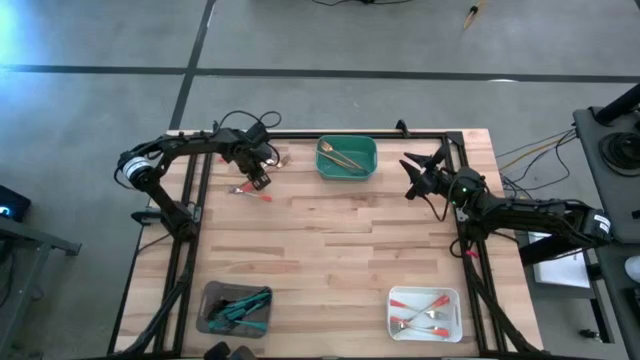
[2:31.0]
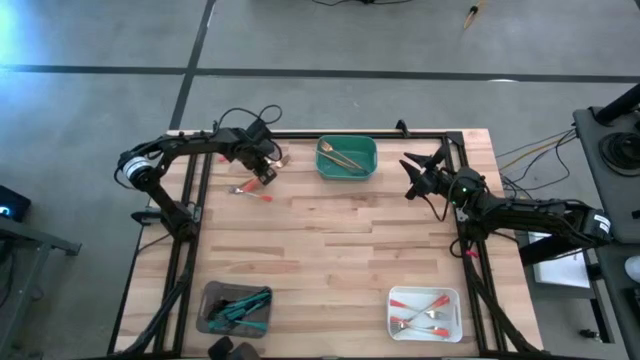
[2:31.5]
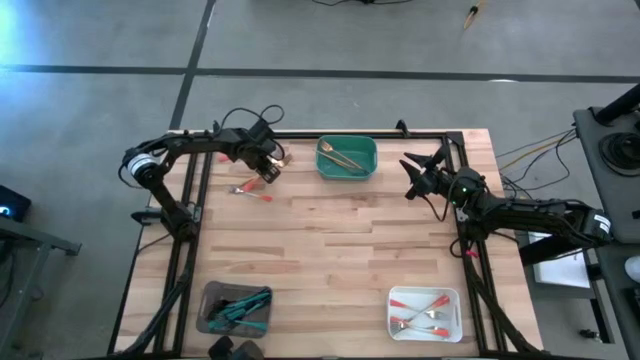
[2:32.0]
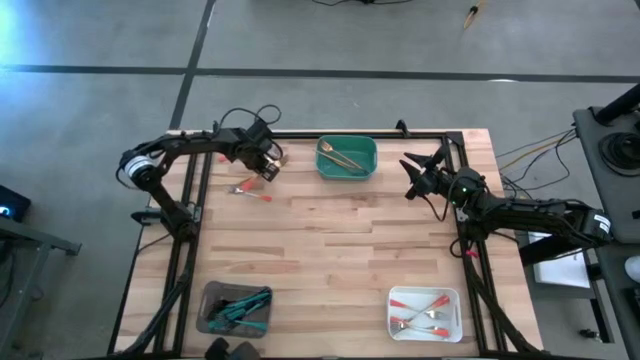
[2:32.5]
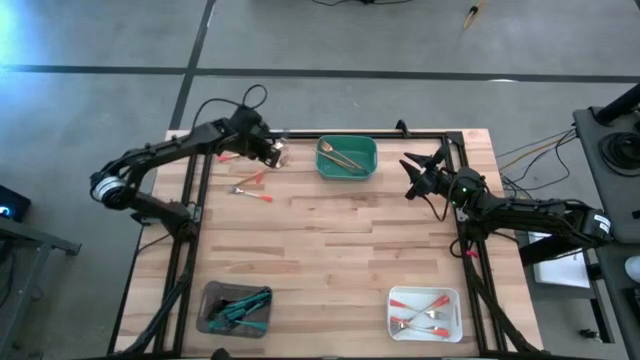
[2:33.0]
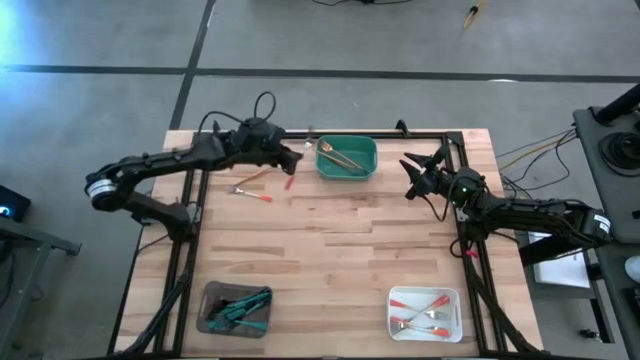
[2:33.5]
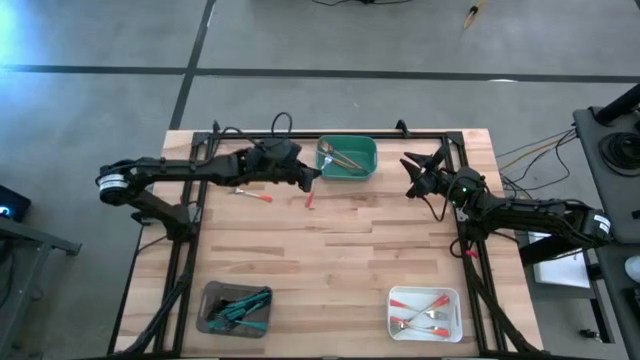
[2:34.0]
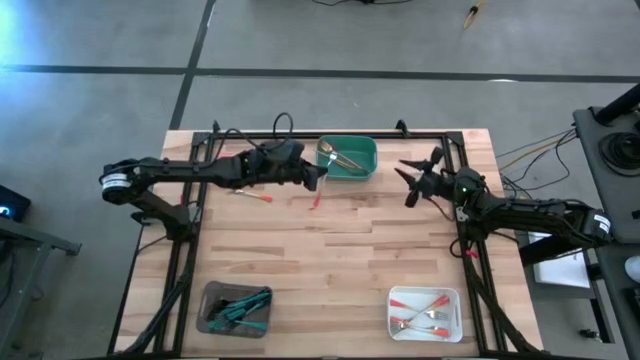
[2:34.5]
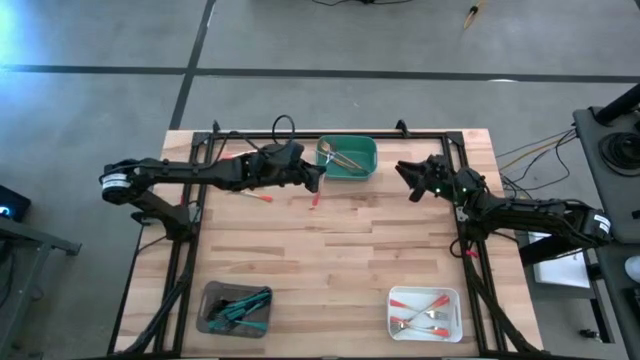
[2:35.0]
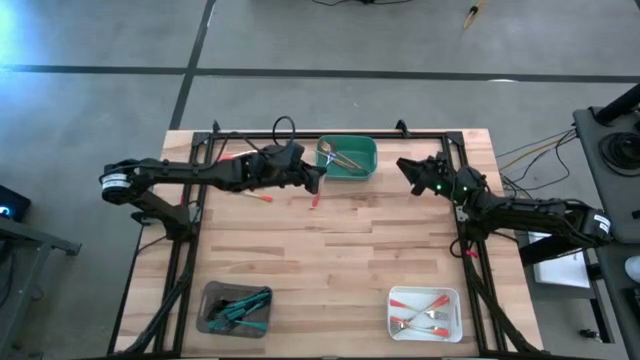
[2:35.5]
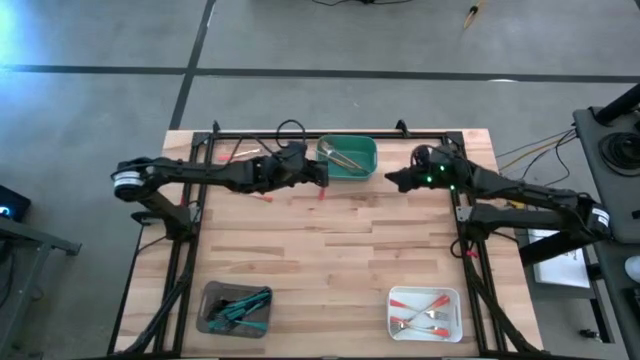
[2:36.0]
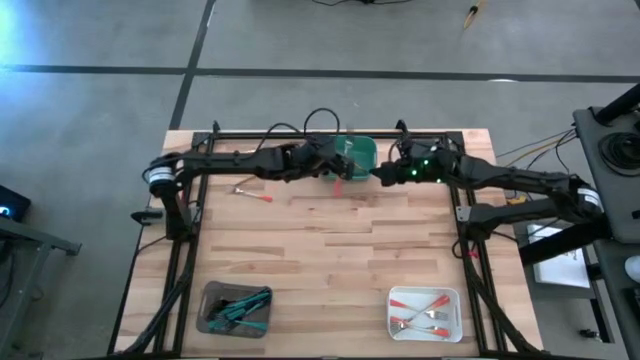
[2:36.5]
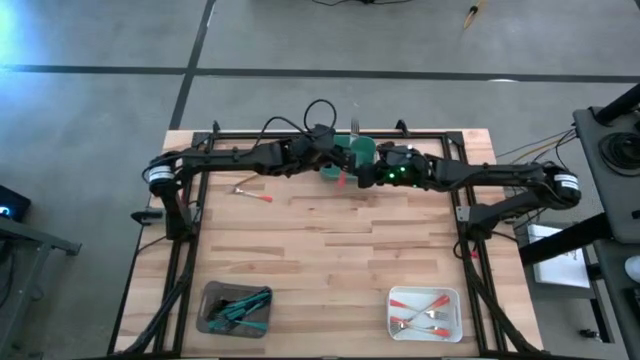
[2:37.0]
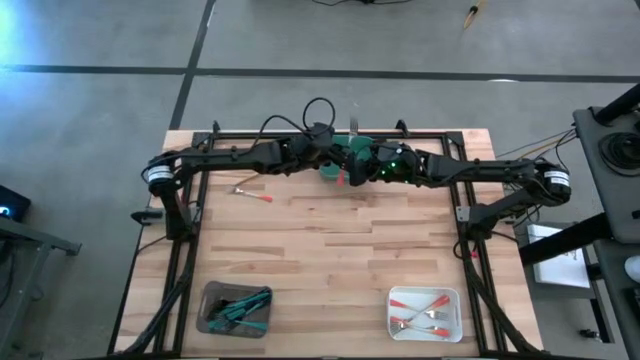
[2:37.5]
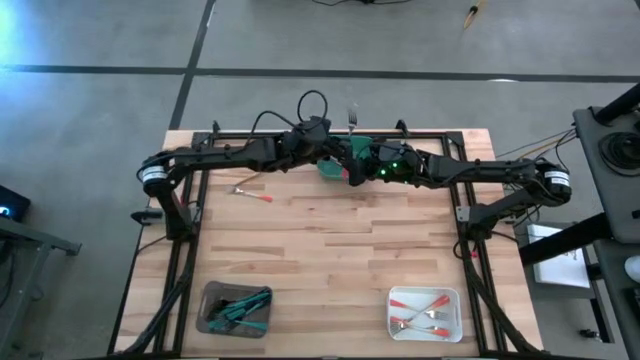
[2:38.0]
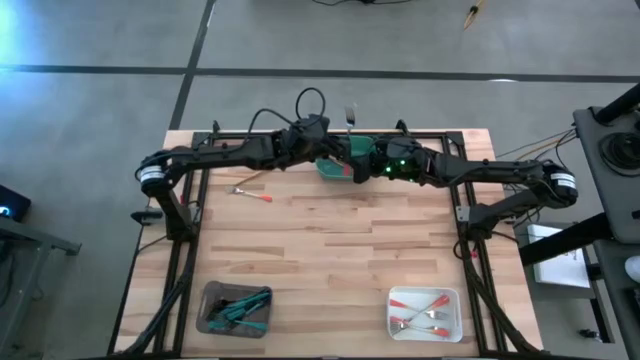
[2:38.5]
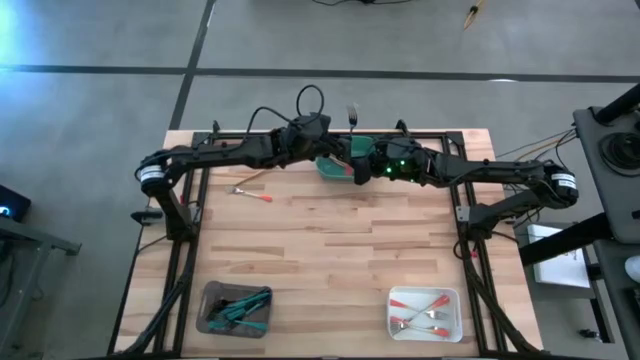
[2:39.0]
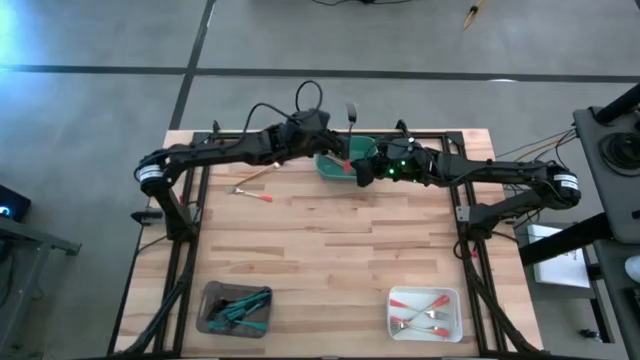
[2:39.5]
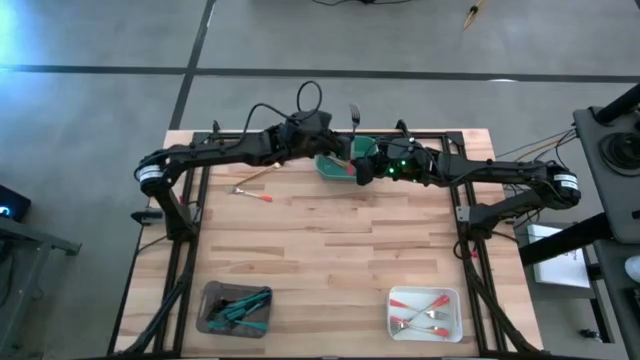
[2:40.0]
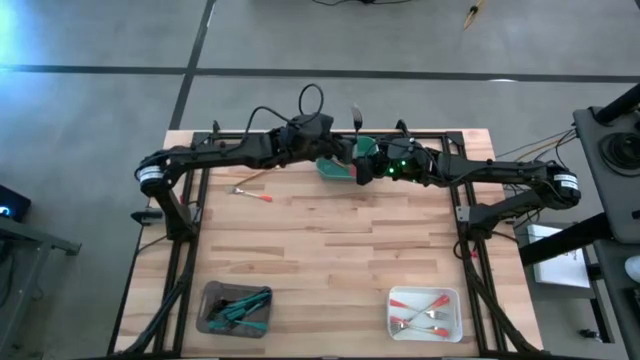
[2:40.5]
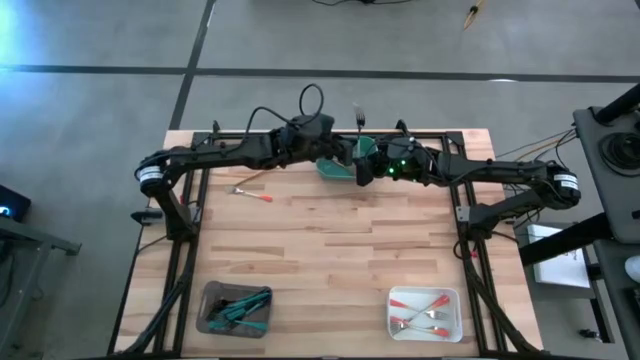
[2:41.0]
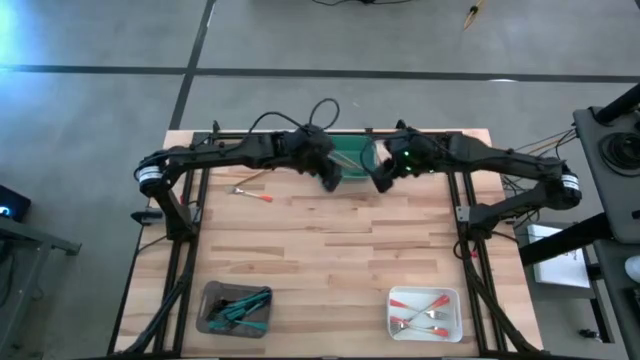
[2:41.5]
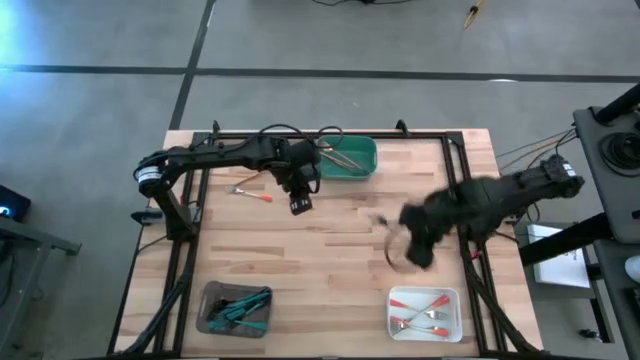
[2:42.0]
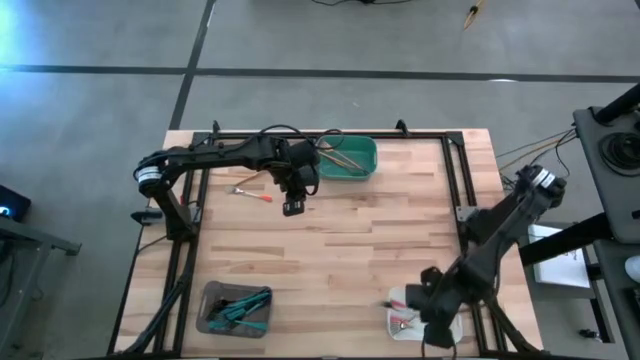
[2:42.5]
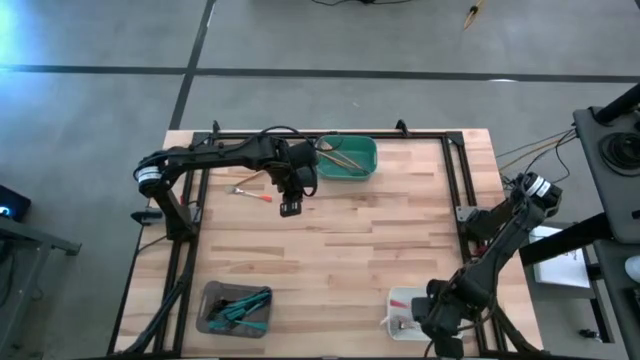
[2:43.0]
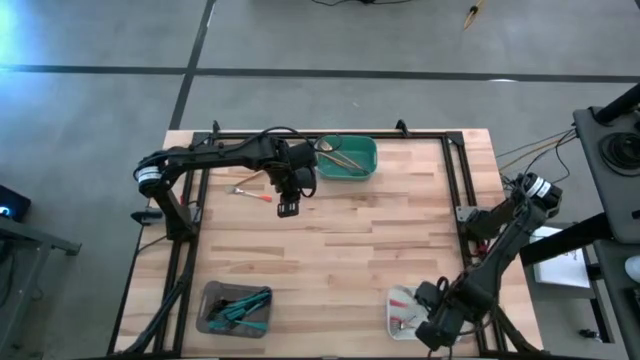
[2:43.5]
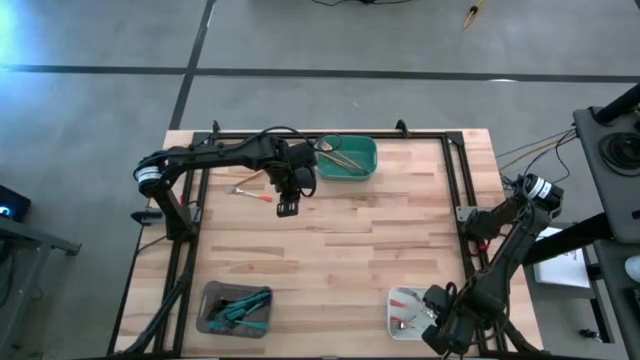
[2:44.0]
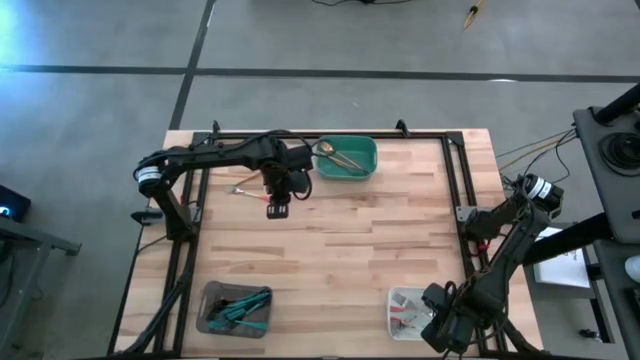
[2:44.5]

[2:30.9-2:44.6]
Task: Sort silverware by color (type)
Put the orange fork into the white bin

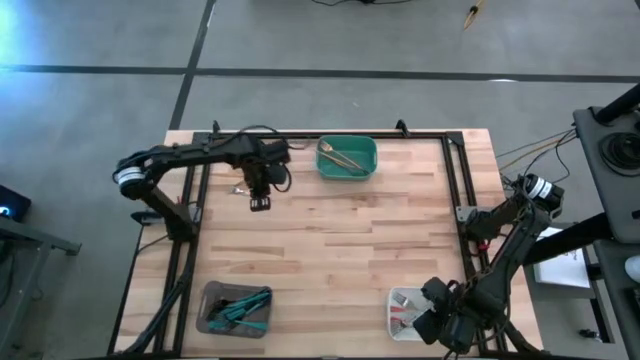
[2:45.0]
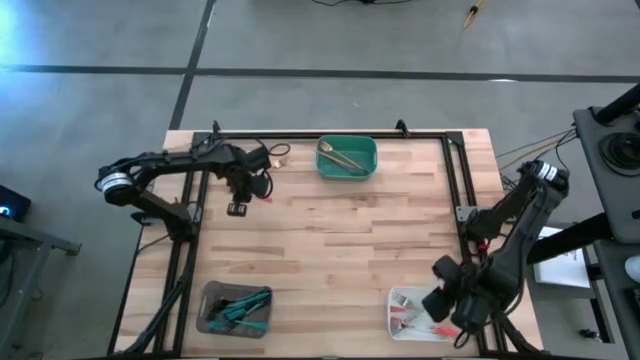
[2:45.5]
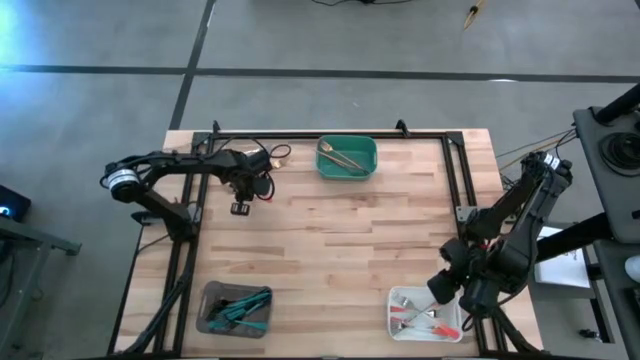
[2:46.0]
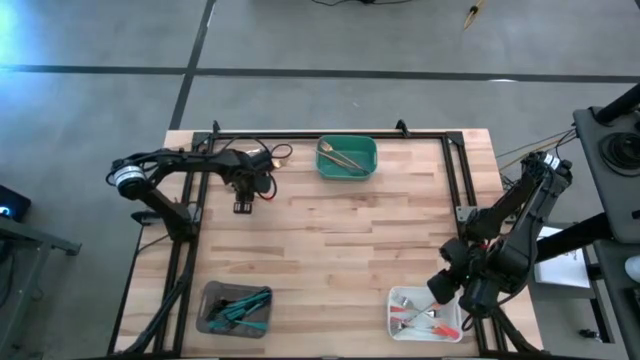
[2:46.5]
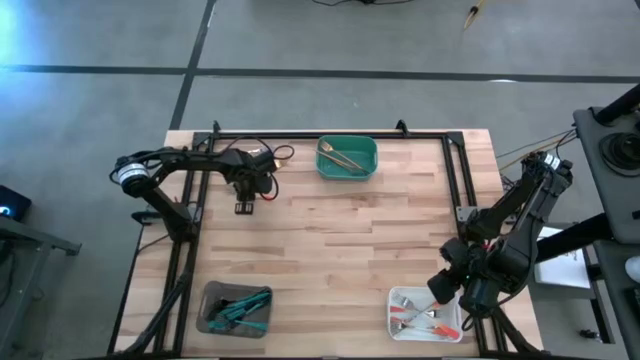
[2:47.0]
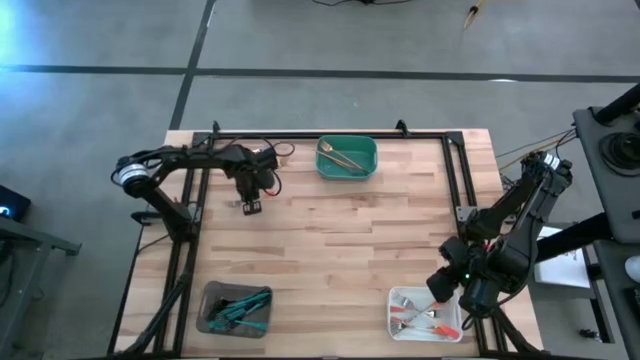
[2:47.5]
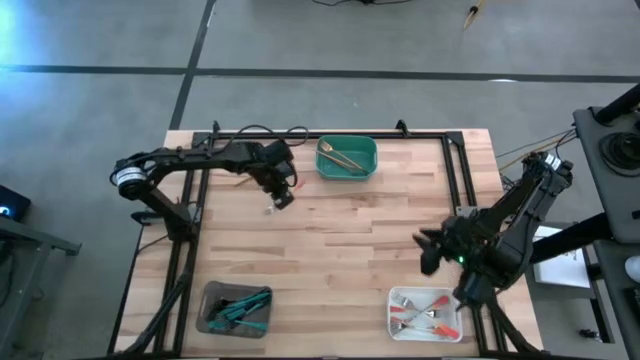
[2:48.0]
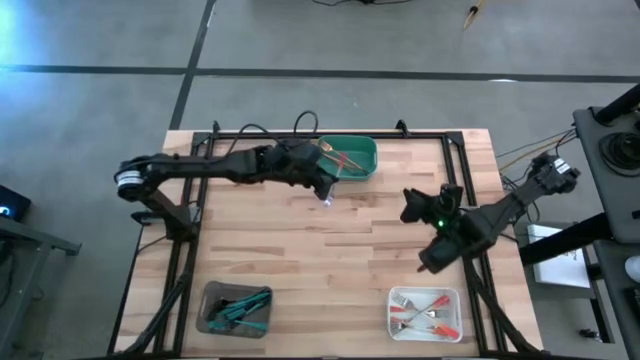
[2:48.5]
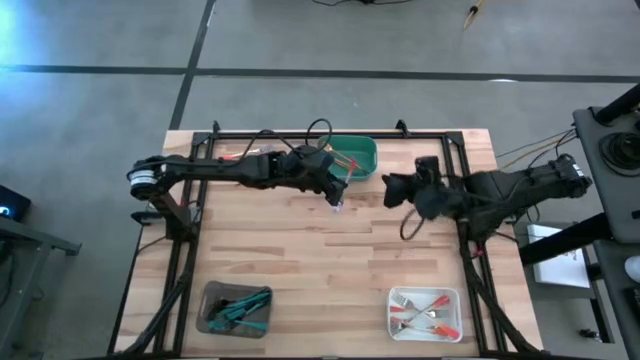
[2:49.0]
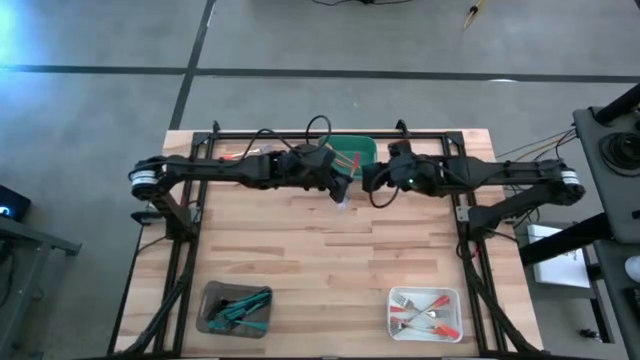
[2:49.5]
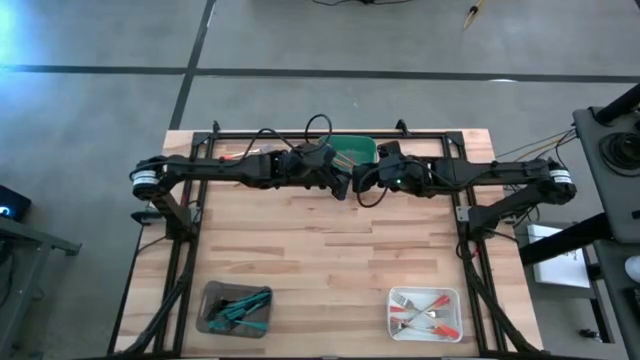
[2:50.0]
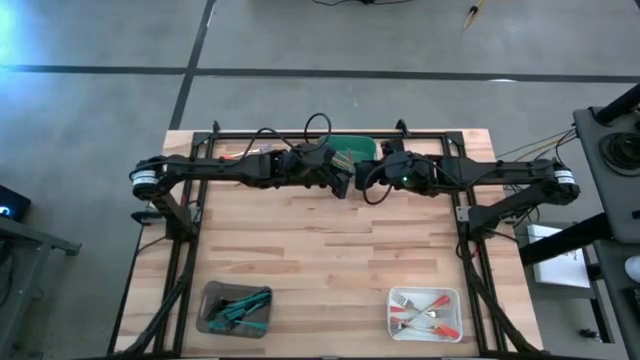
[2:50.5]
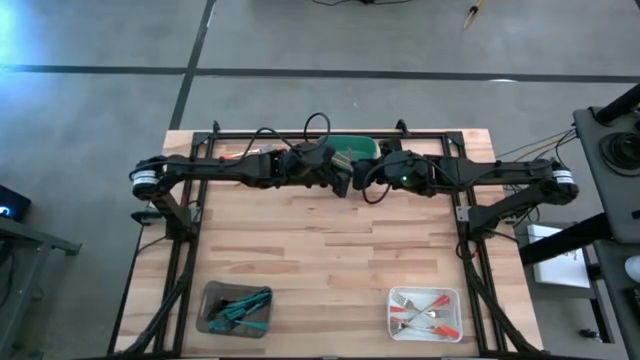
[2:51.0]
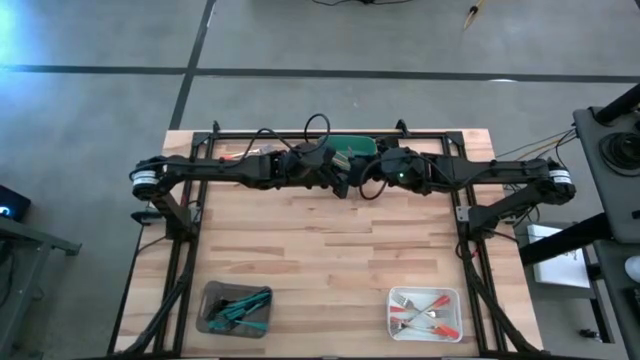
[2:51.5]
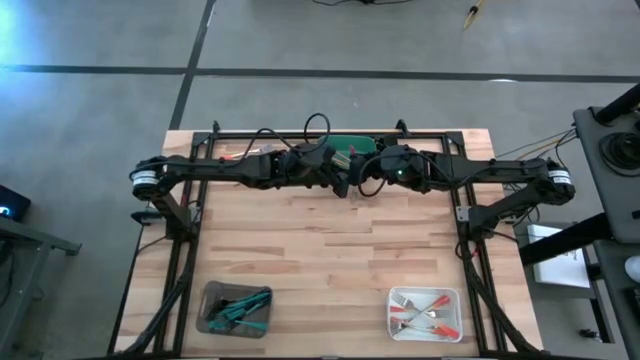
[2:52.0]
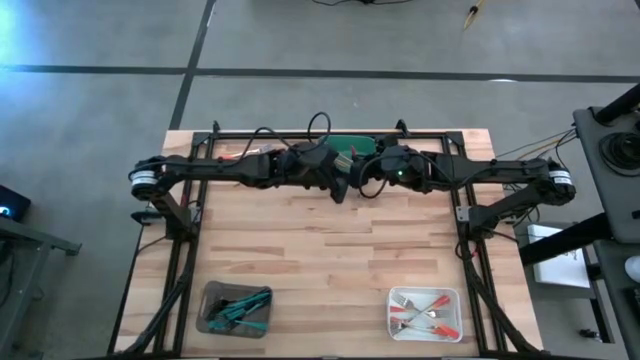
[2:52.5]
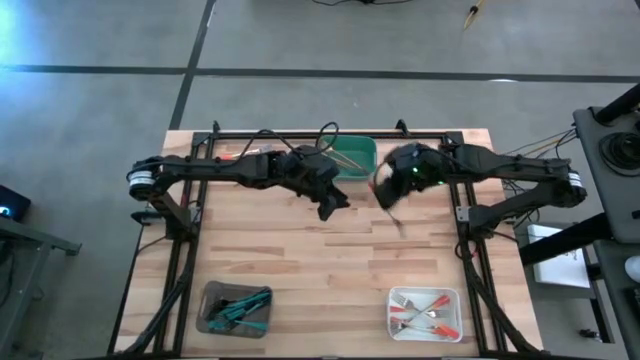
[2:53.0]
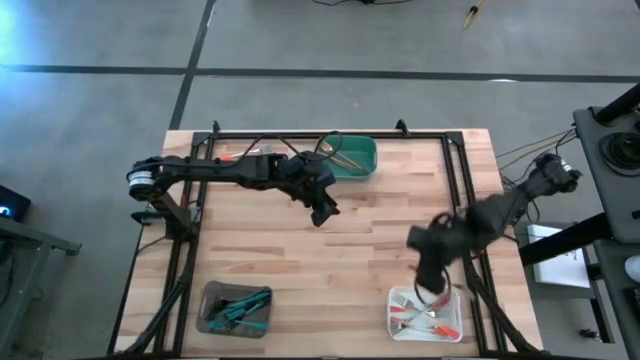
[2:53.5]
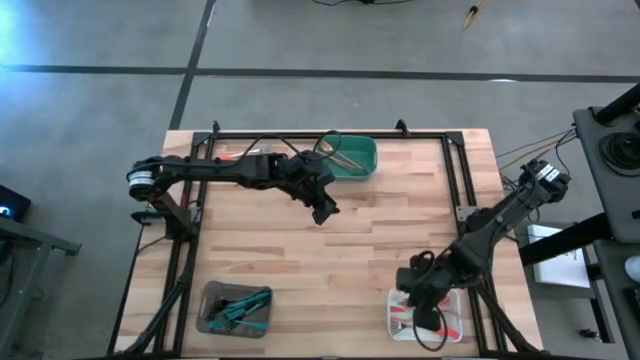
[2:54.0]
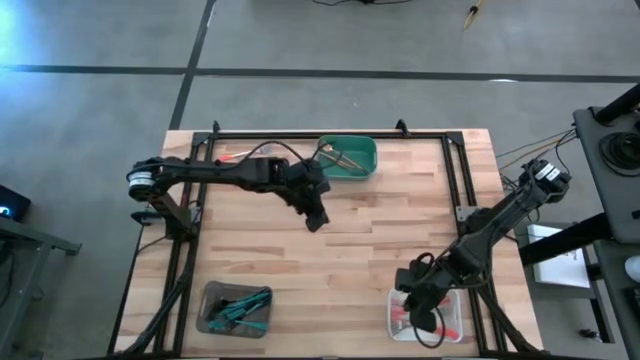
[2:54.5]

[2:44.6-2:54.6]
Put the orange fork into the white bin
